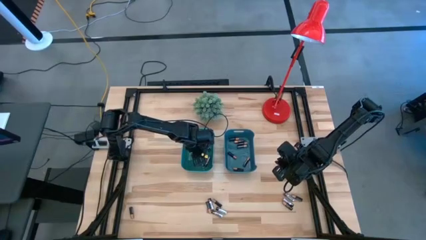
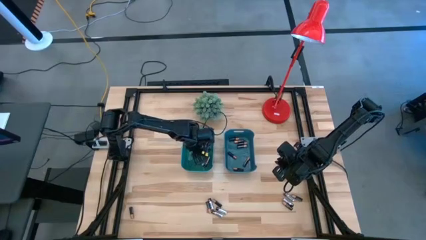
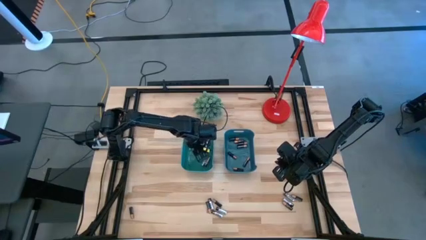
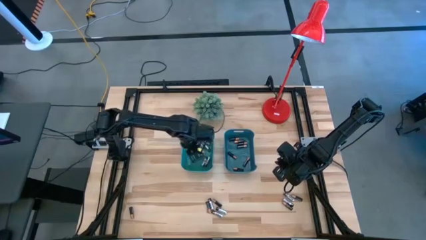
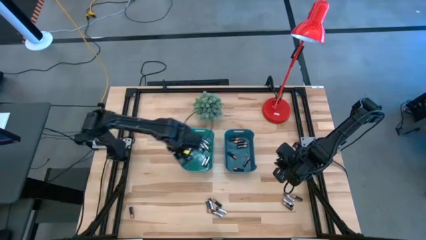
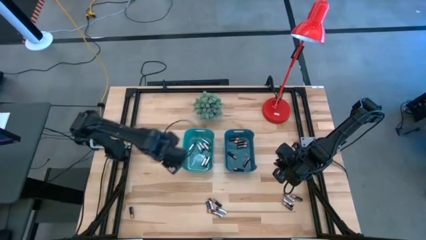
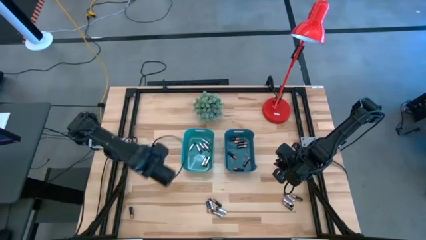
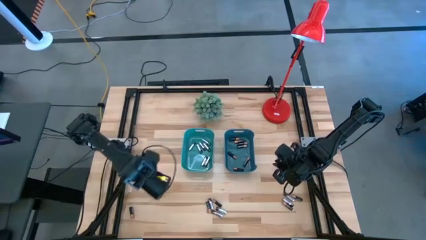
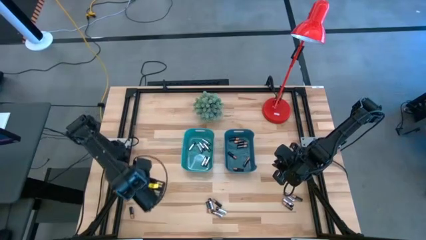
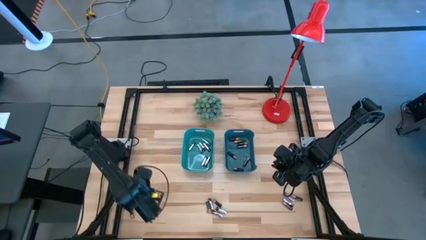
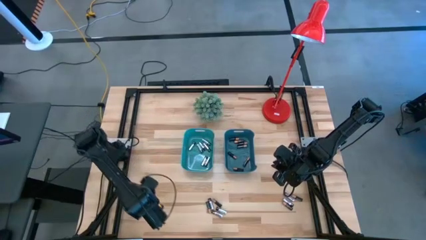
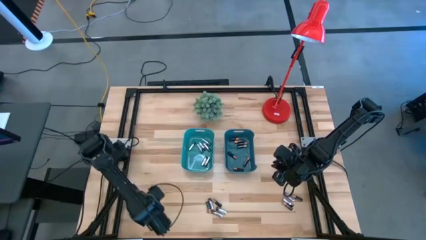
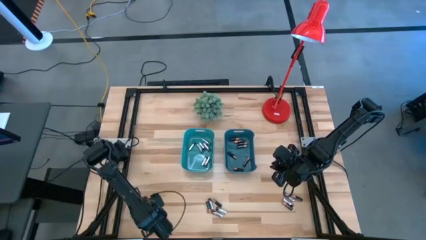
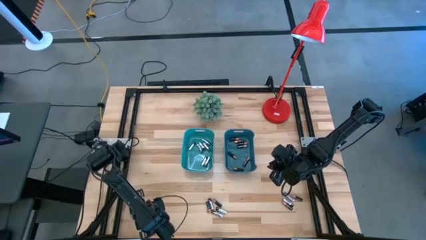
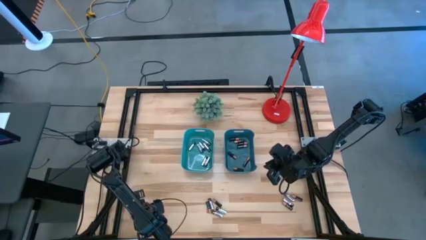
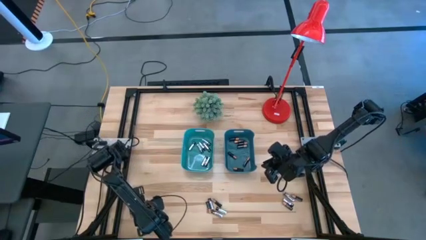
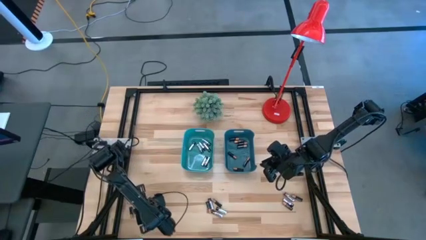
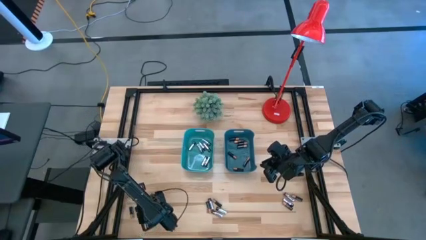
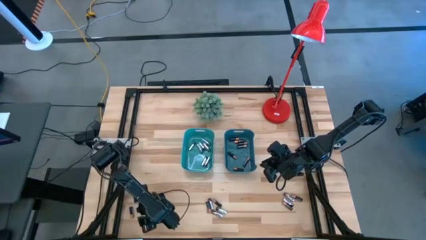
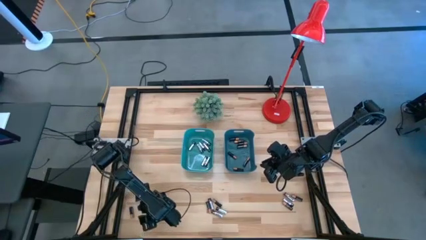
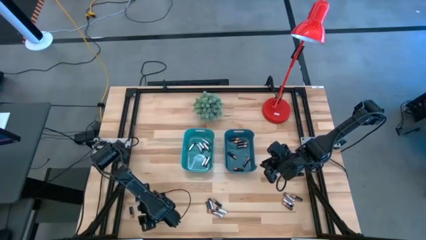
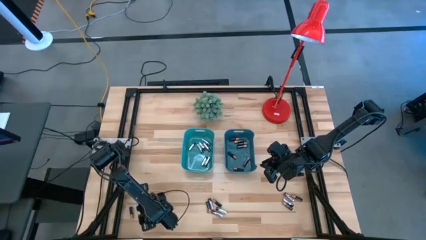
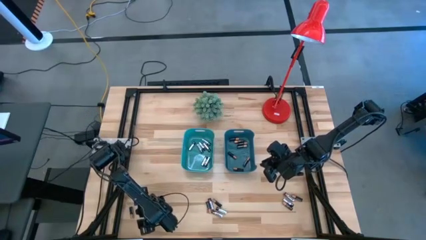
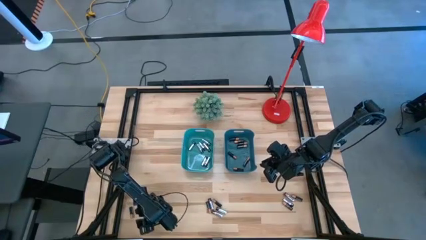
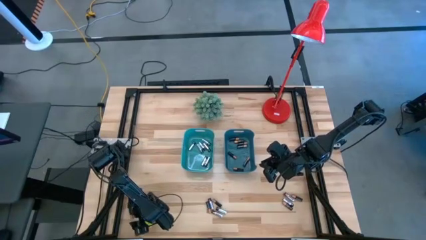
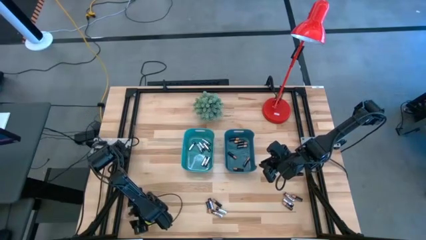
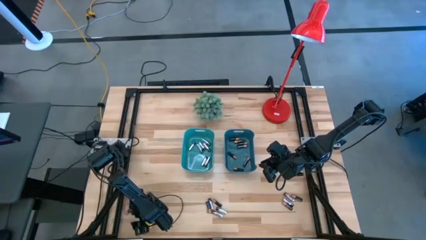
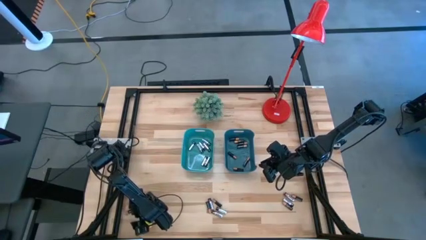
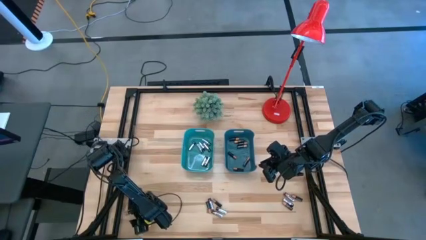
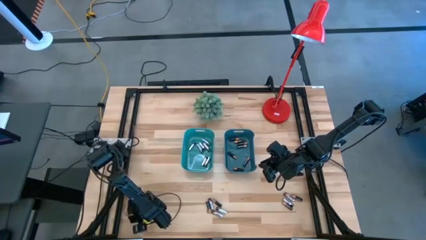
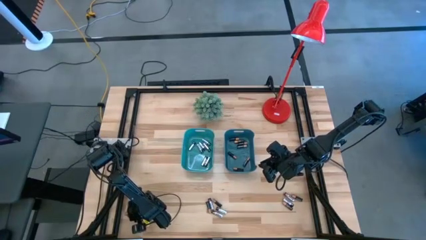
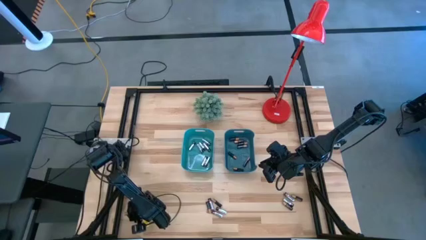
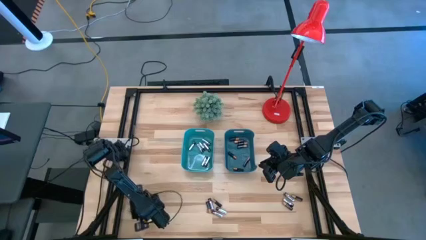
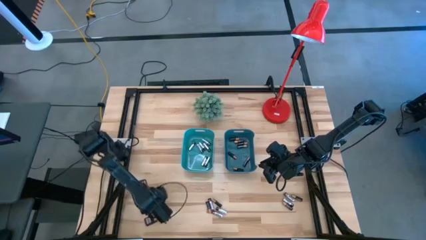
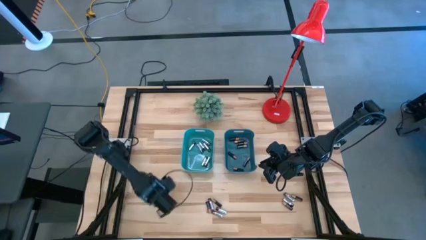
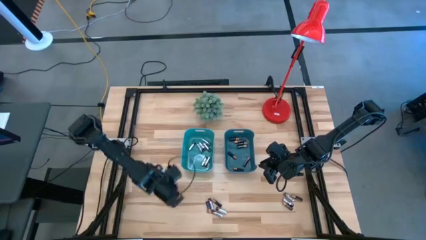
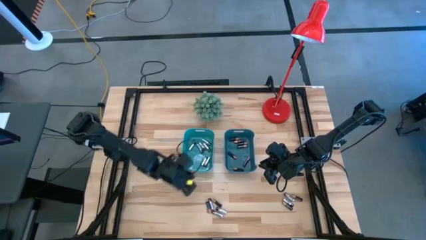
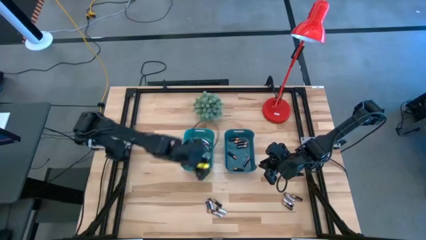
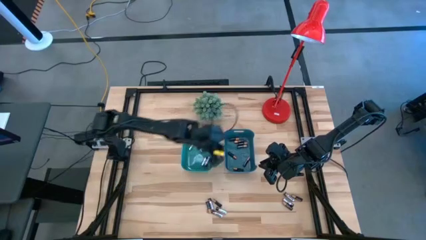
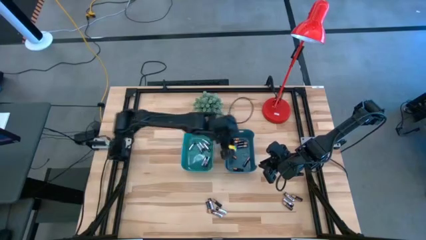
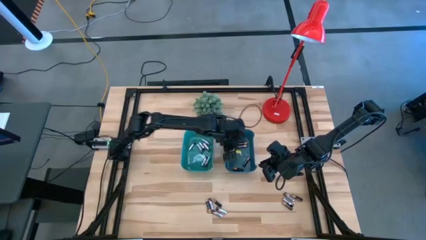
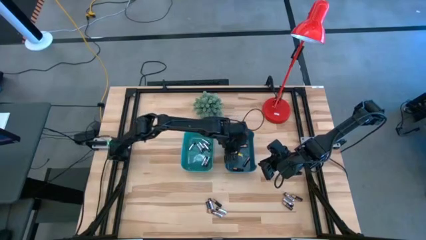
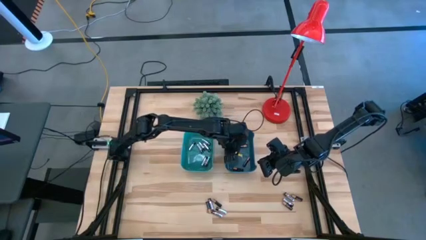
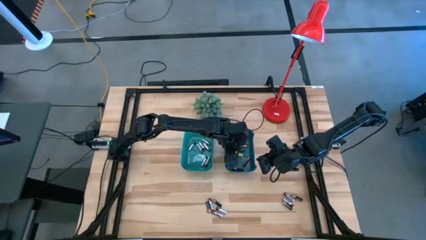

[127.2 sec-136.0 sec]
Task: Sort batteries
Put the black battery into the blue bin

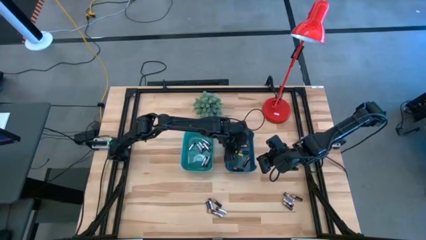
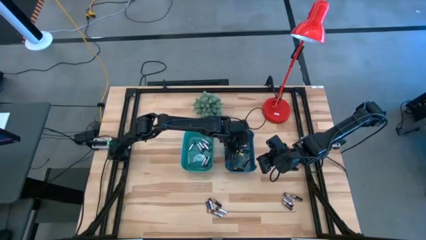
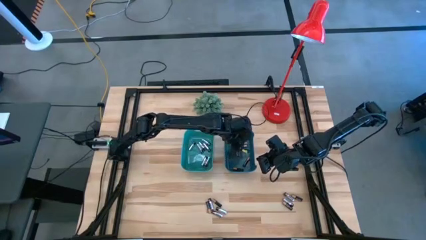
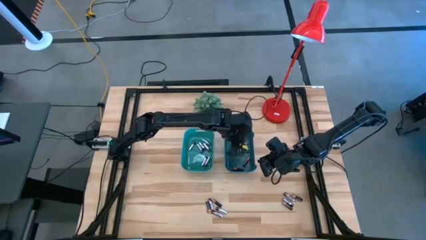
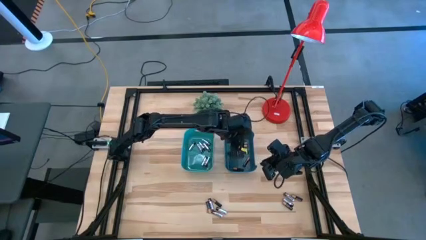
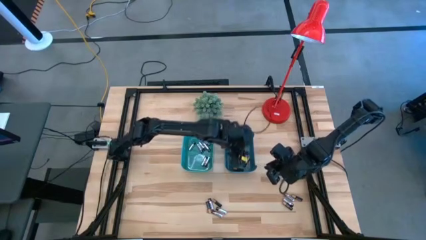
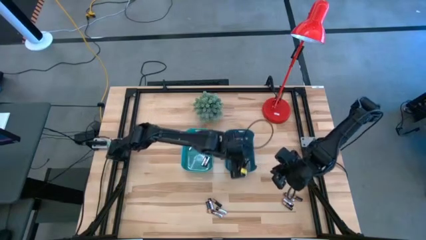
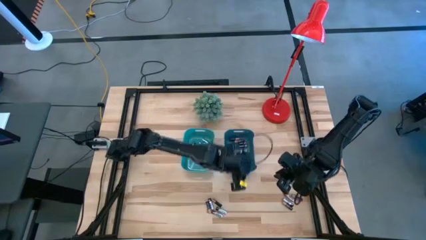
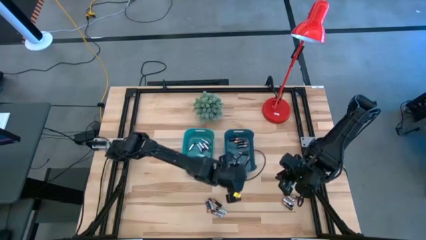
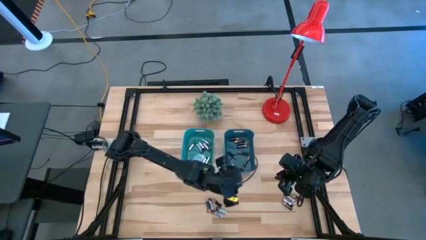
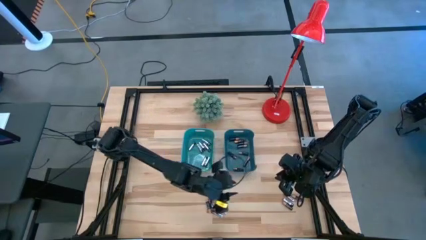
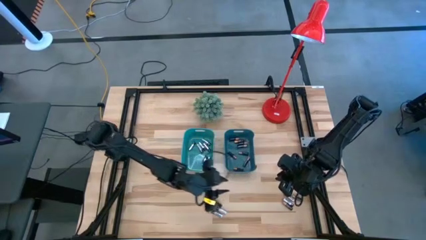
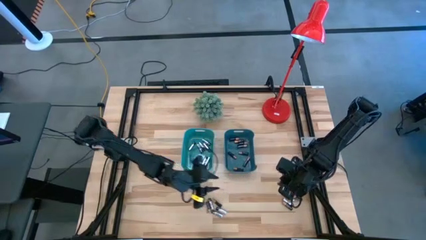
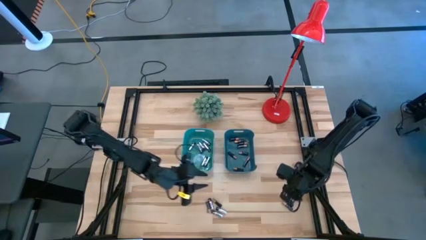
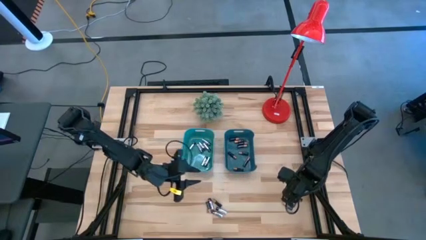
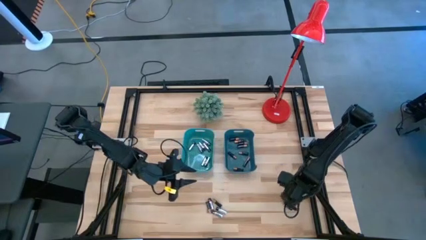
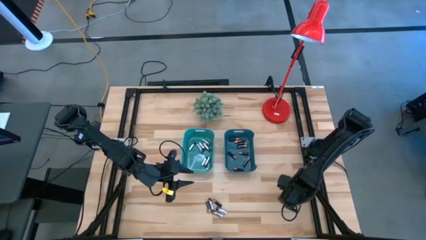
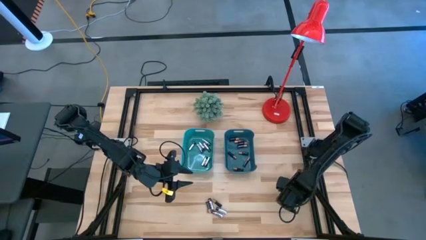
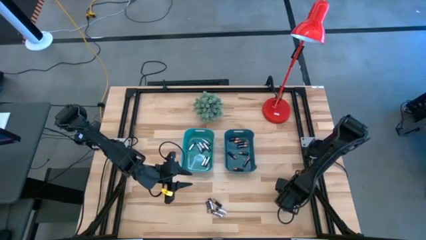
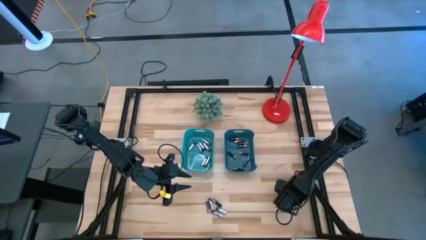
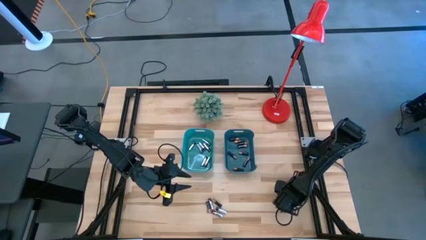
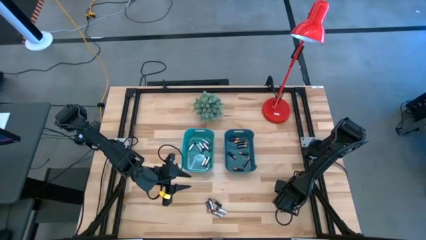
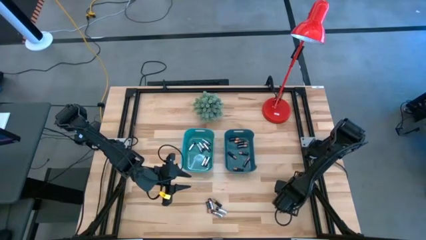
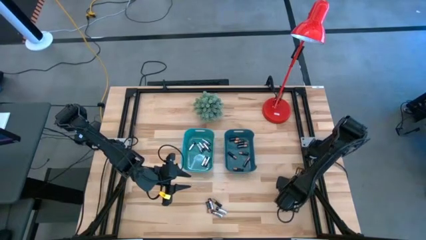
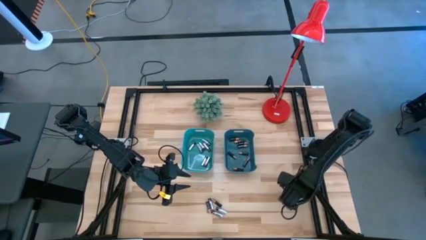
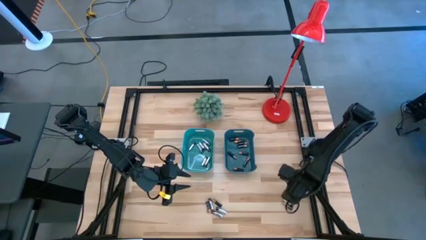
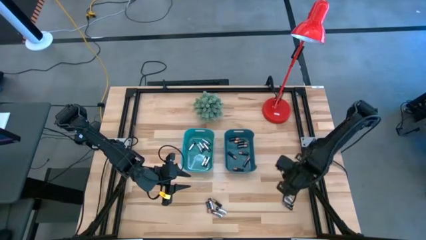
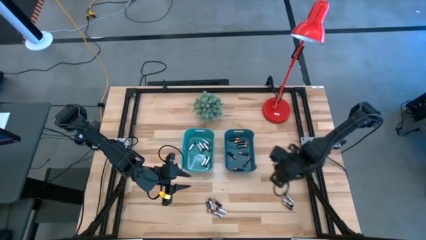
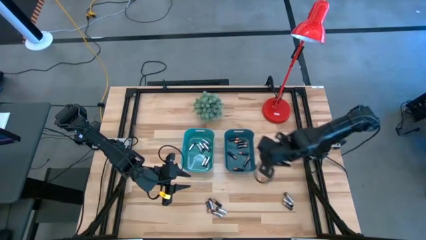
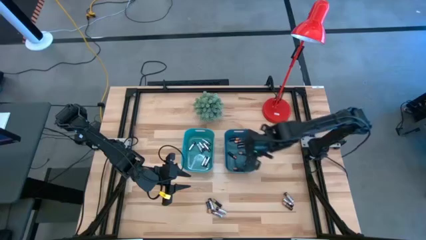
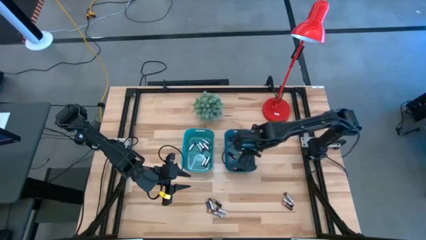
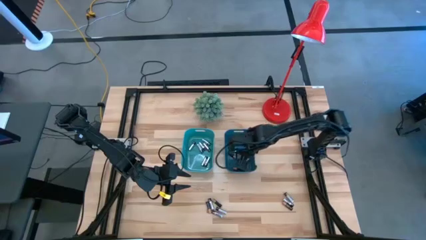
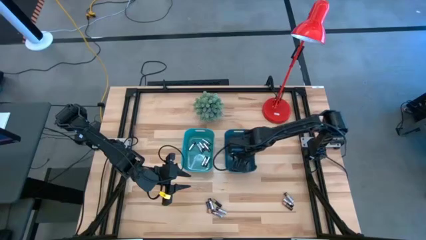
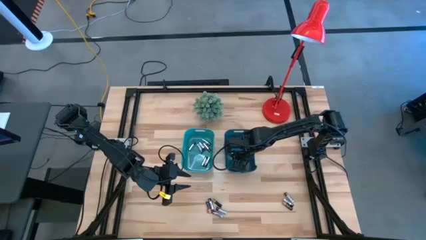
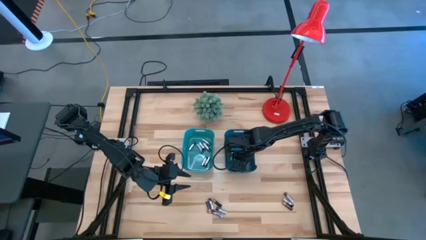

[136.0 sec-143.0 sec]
Put the black battery into the blue bin

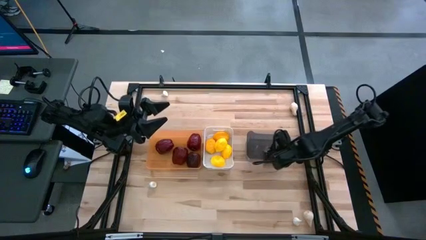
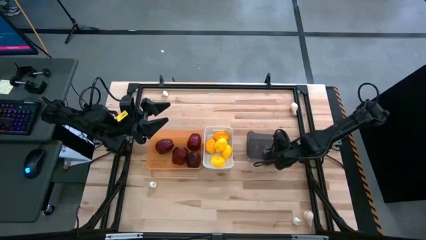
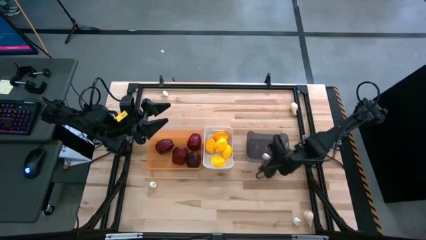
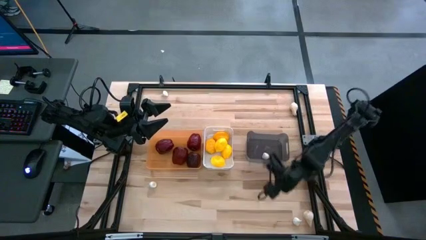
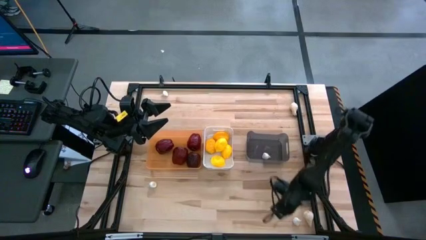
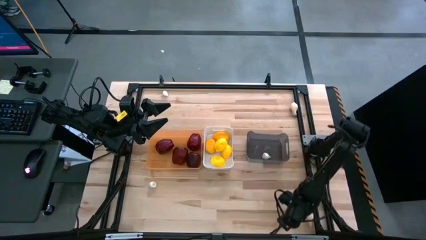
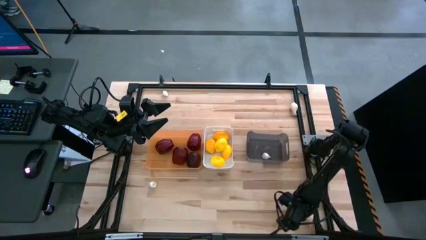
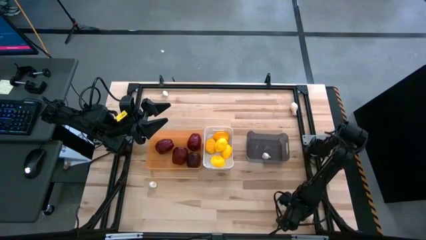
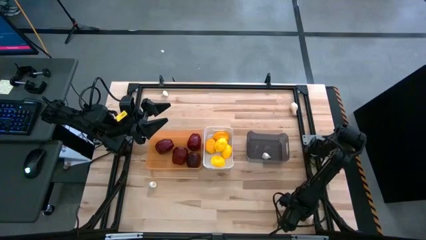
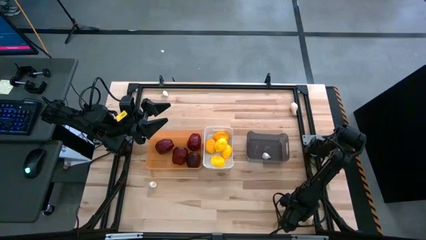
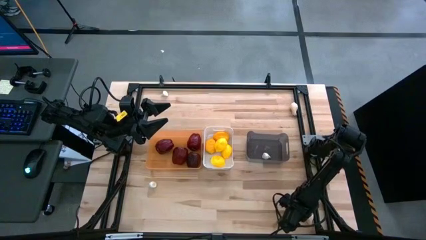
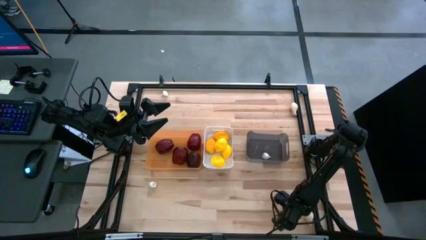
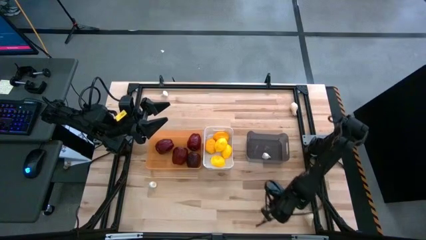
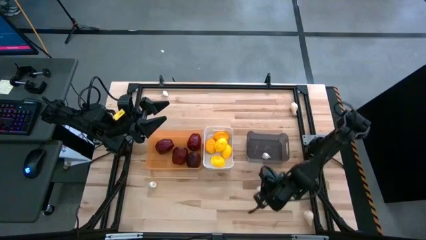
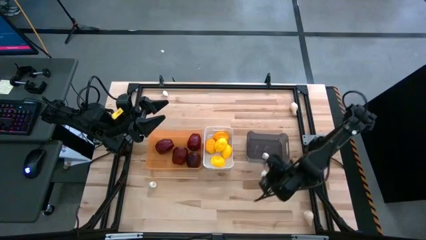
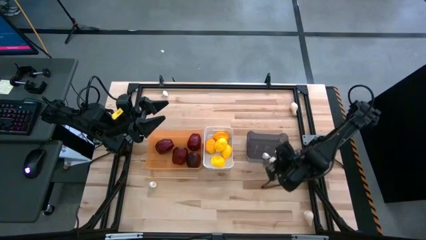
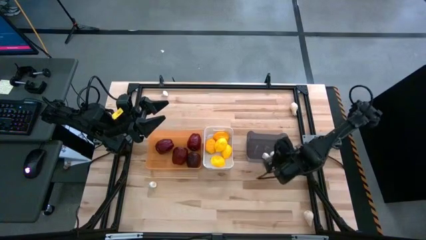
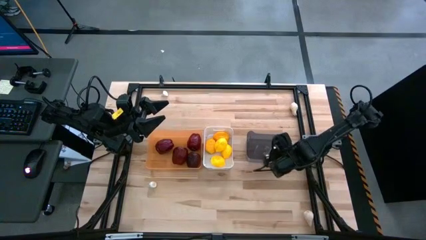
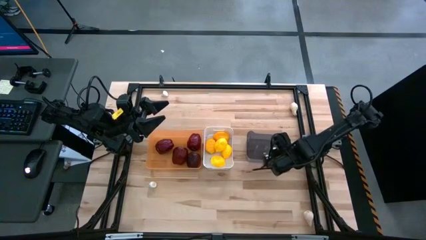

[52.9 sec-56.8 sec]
Task: Sort produce into baskets
Put the white garlic into the black bin
